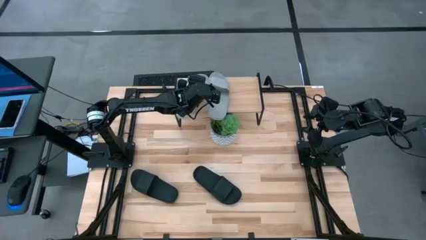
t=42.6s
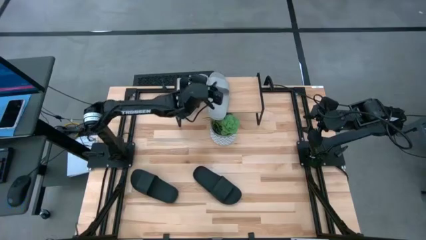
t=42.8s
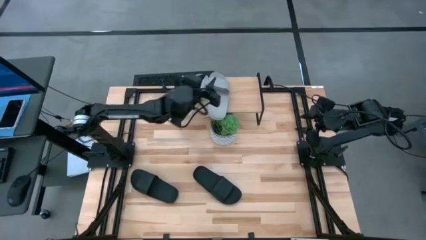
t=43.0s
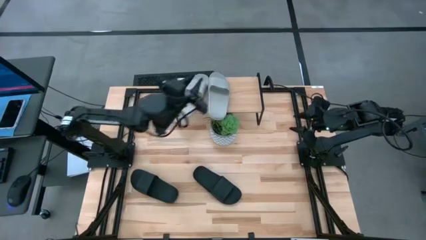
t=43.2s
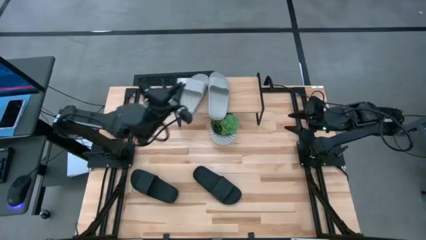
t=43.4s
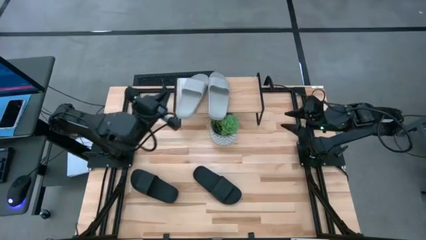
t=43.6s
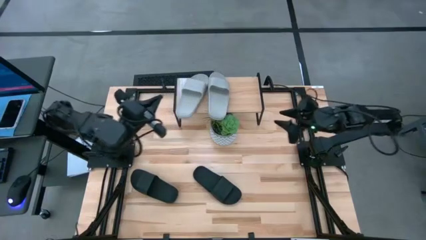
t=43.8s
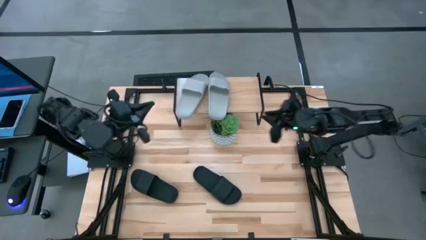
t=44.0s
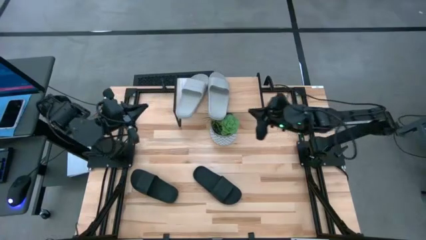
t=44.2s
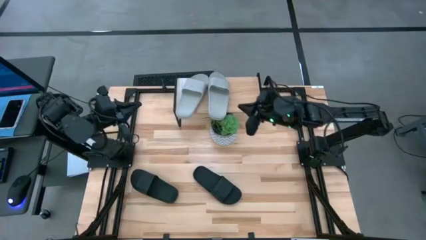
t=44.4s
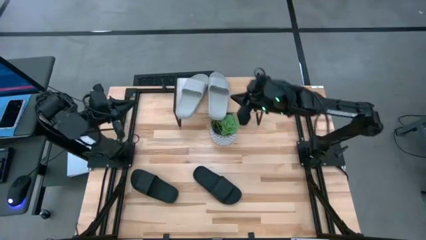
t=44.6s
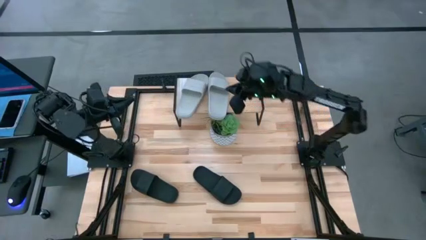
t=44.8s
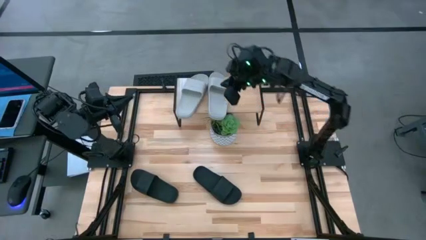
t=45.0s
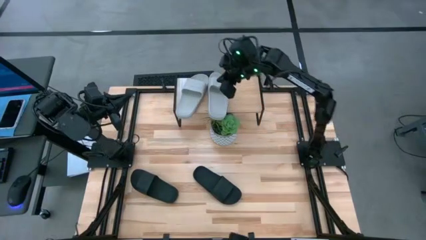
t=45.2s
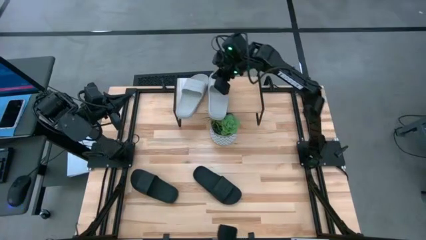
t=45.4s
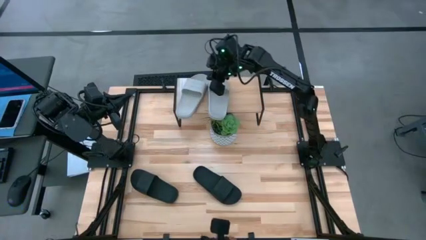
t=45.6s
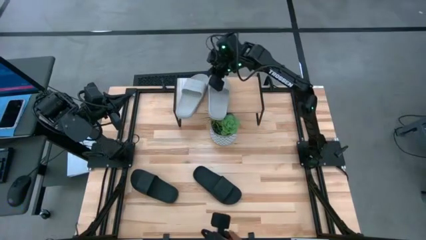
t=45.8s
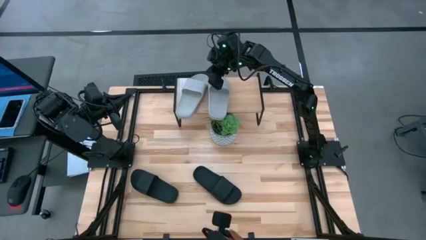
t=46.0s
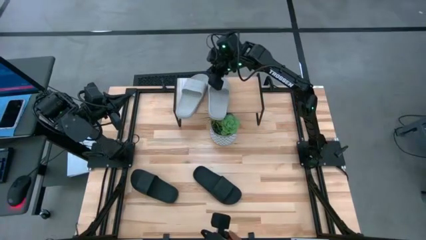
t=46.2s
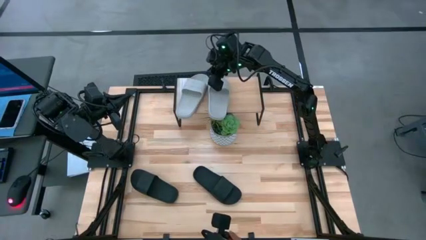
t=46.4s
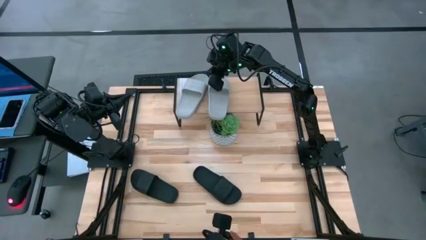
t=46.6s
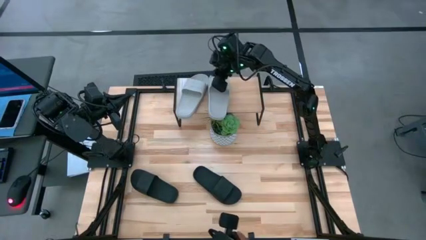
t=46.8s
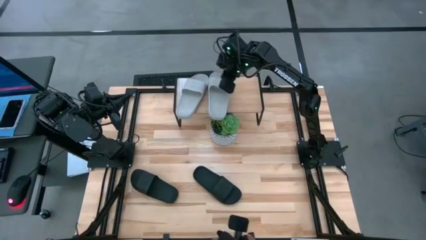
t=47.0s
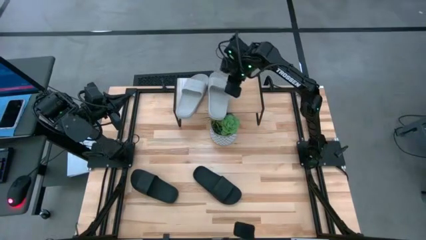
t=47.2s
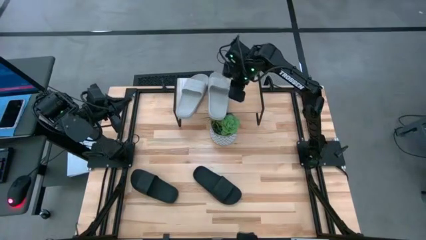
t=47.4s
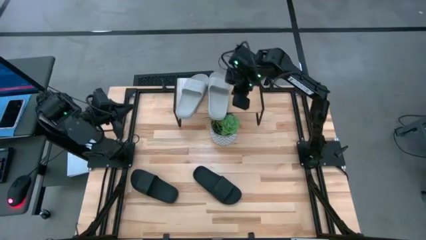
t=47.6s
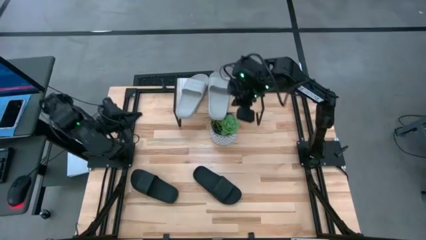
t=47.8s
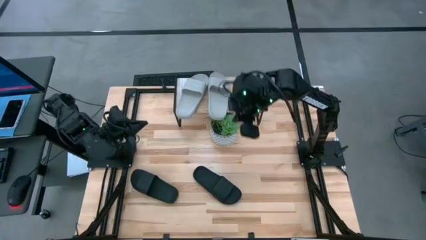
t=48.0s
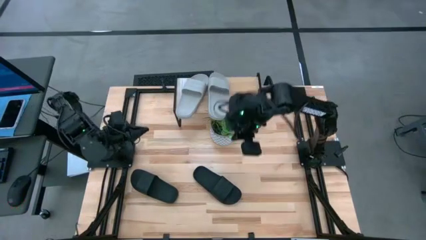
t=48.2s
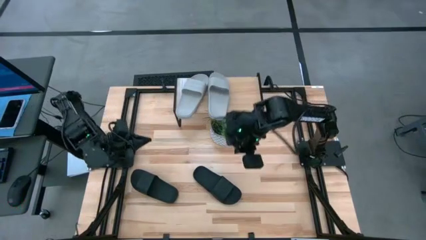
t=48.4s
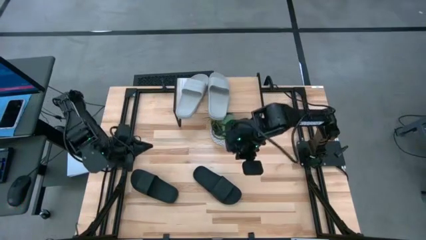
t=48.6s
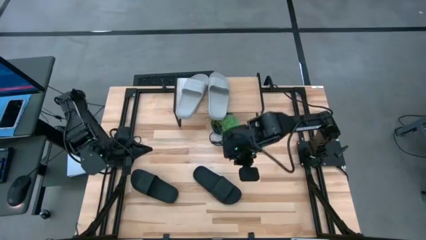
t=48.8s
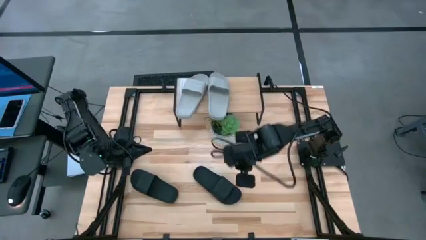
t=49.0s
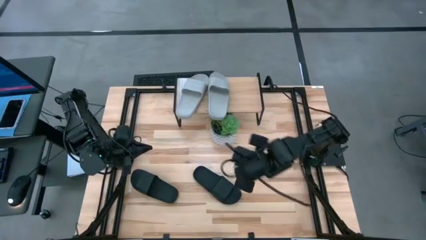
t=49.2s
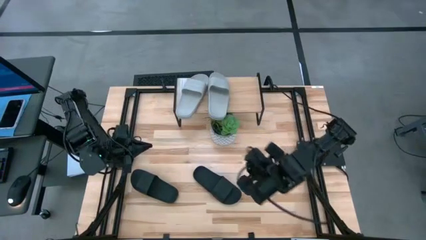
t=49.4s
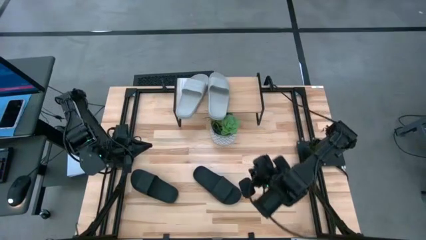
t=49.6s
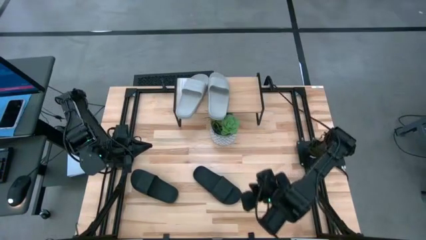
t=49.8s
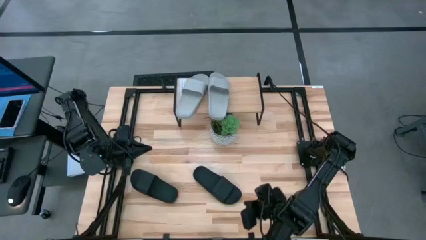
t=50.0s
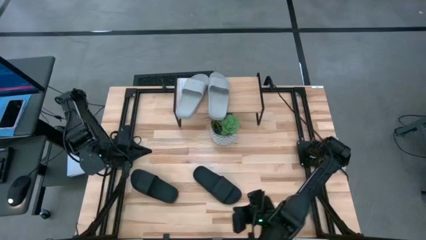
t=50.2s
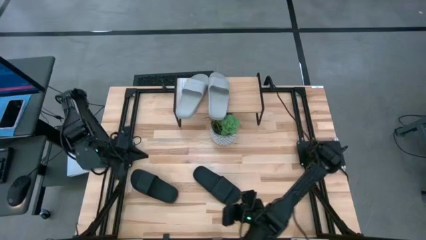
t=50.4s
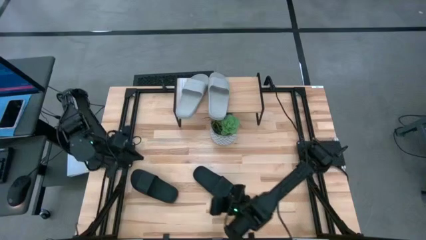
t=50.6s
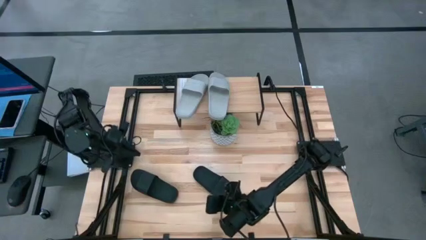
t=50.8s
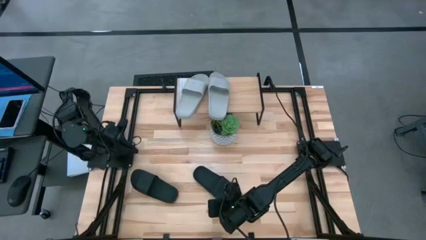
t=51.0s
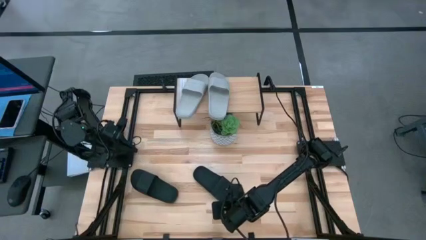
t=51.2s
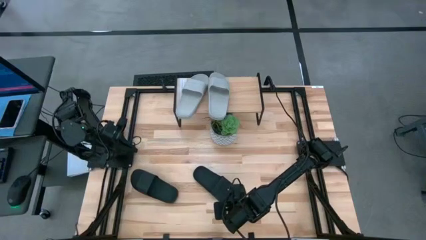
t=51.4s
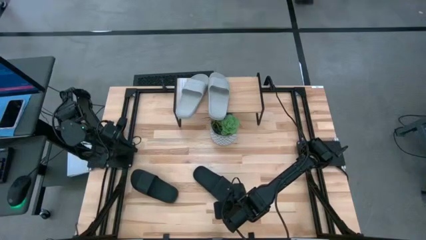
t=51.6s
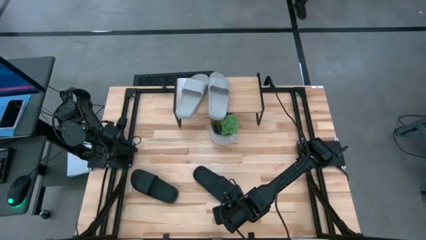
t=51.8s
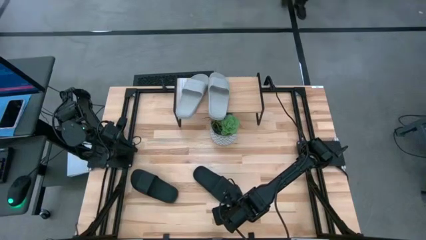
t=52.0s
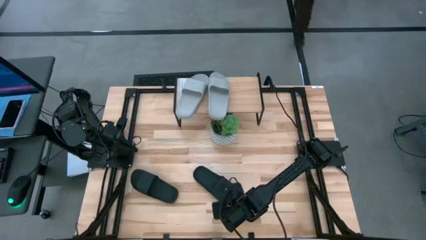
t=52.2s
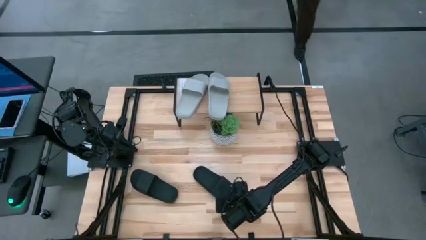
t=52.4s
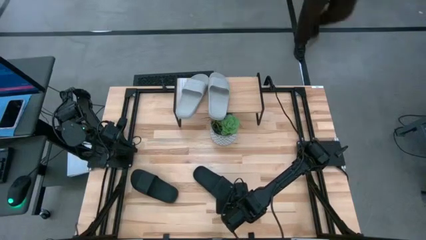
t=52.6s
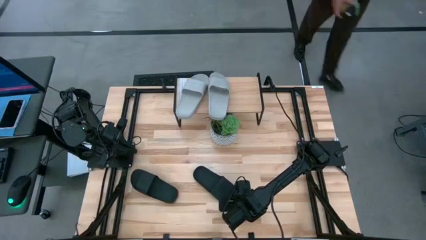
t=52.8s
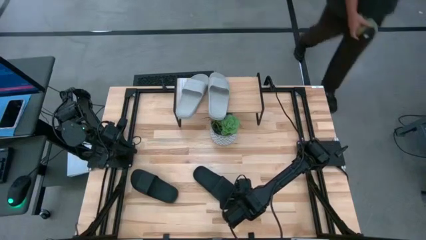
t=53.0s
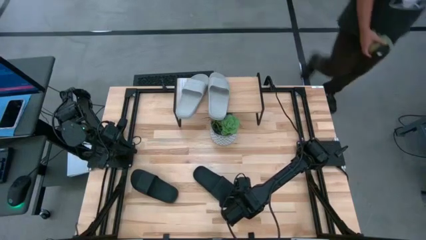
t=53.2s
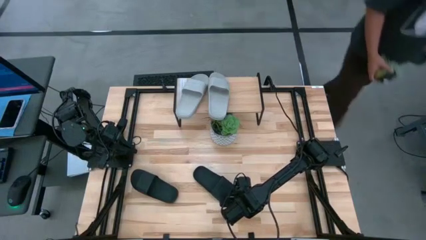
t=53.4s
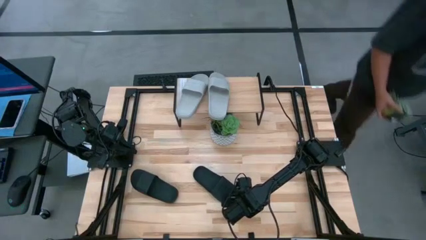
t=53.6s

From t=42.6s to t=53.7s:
Task: Pick and place slides into the shelf
Put the right black slide on the shelf

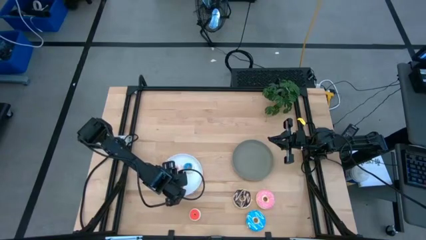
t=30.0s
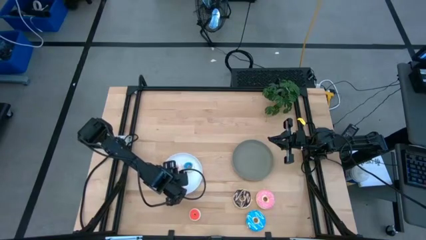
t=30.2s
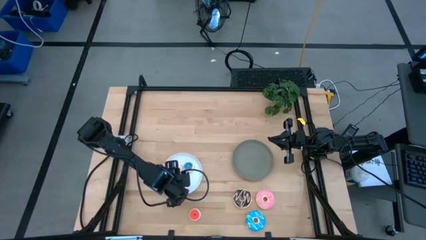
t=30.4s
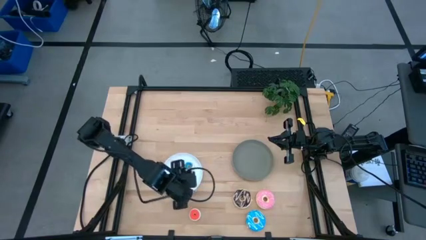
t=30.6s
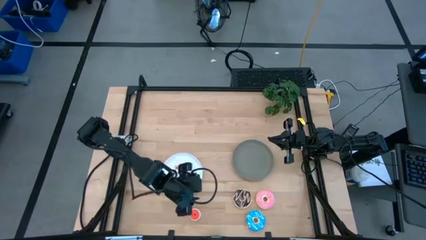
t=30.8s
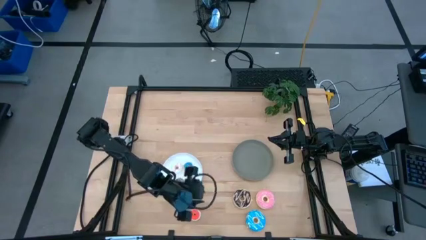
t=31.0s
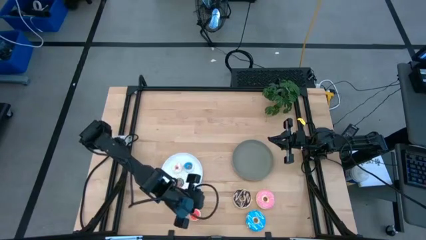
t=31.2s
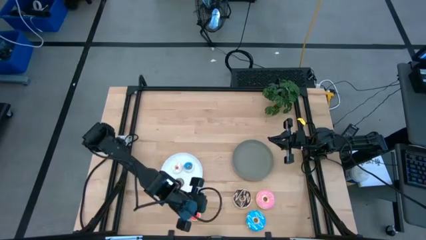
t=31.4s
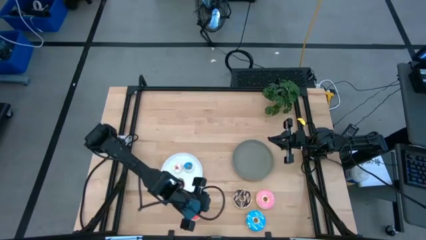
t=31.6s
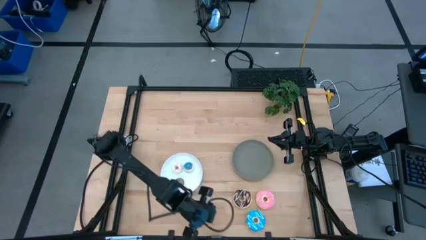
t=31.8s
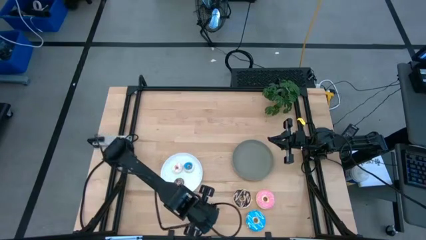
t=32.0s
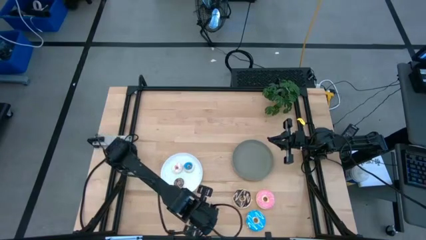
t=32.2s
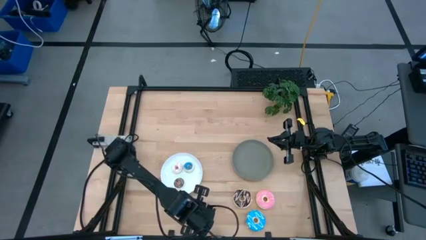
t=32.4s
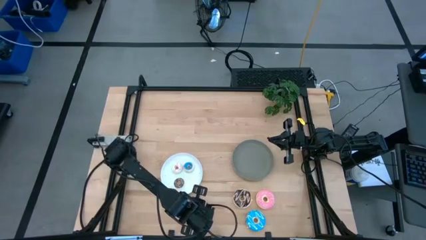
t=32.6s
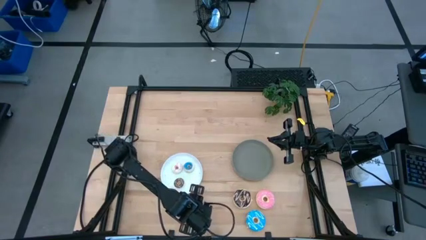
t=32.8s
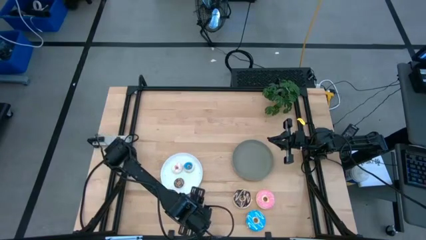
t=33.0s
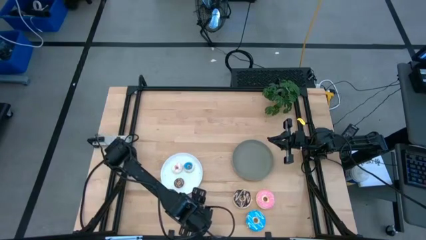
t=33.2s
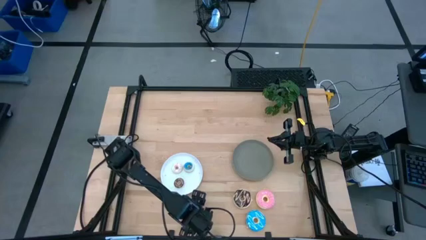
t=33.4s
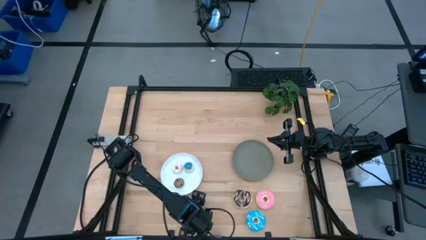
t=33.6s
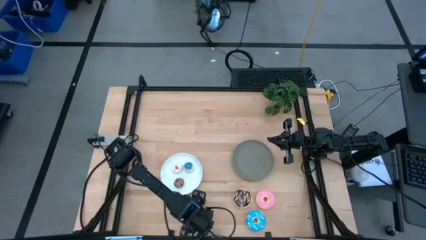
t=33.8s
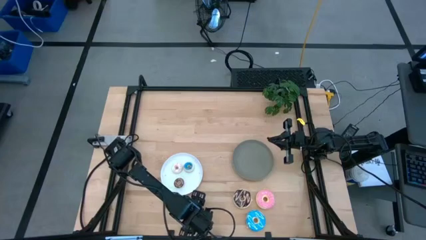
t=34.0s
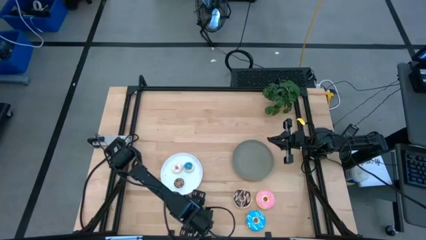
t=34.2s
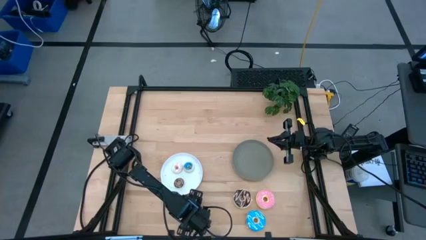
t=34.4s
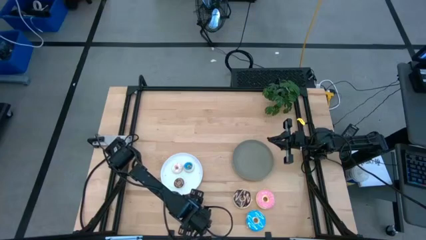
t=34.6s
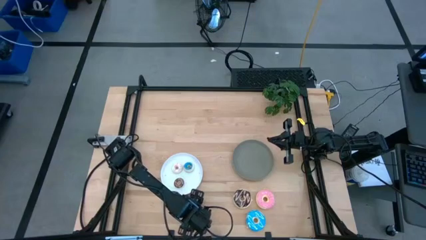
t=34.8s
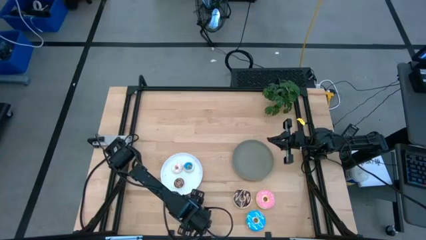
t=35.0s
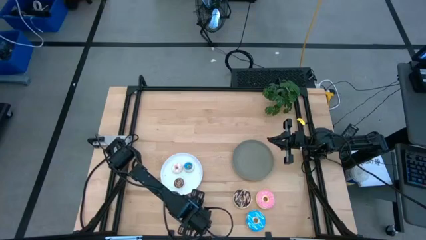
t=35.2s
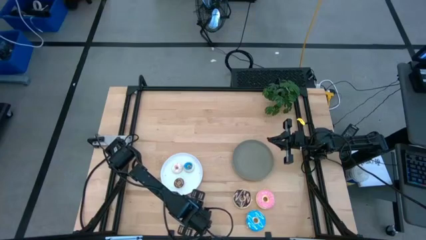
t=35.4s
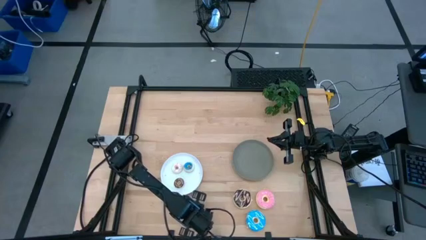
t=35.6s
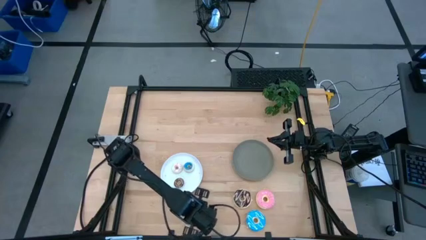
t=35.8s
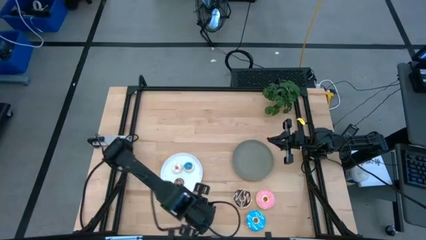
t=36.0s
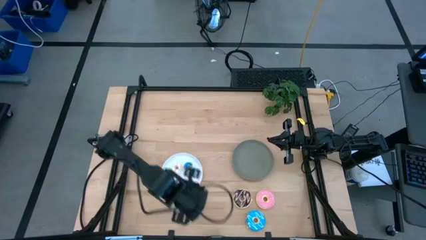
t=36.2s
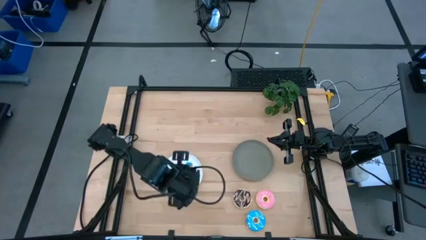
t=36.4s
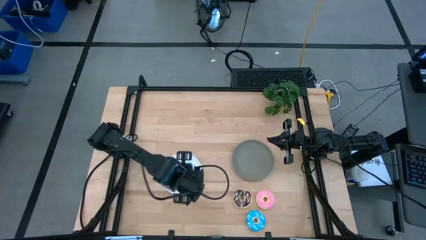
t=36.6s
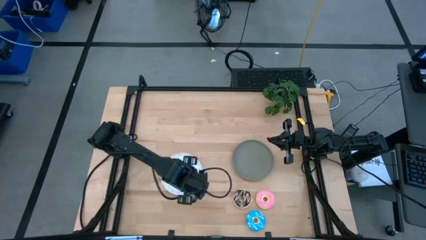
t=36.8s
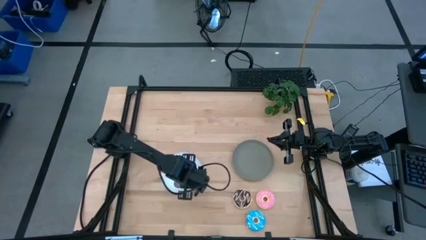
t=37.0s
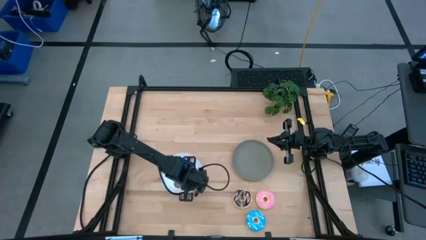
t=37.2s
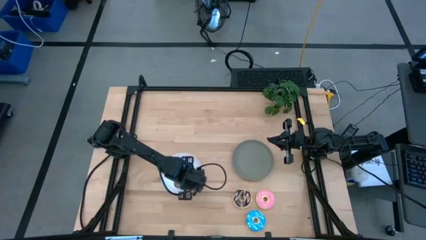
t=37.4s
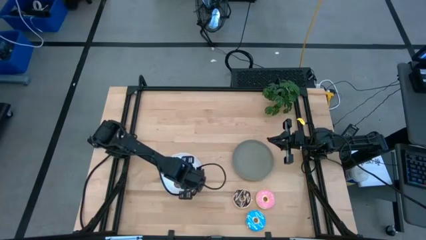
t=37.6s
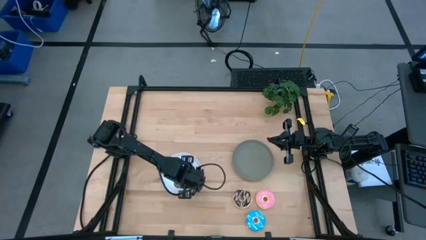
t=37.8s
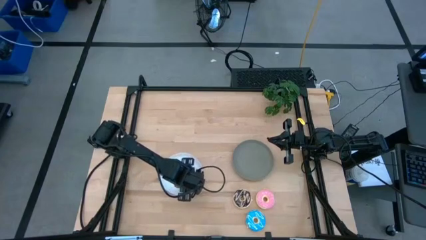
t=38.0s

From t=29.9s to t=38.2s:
Task: Pick & Place donuts
Put the small red donut on the white plate
